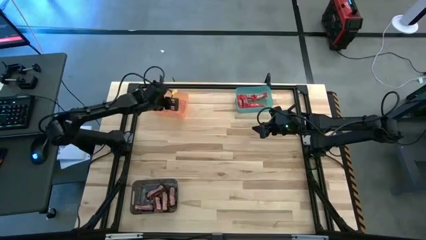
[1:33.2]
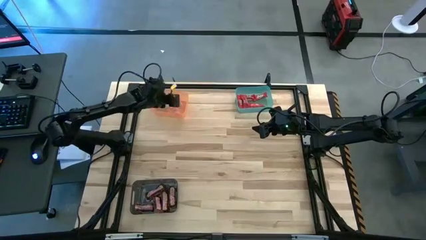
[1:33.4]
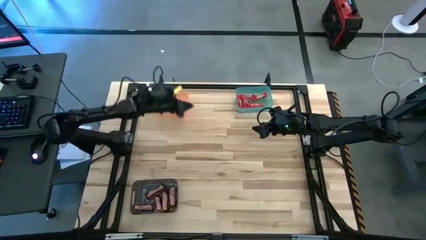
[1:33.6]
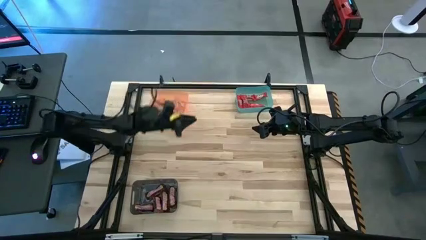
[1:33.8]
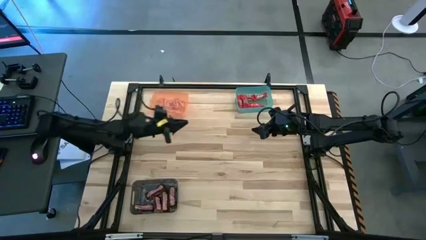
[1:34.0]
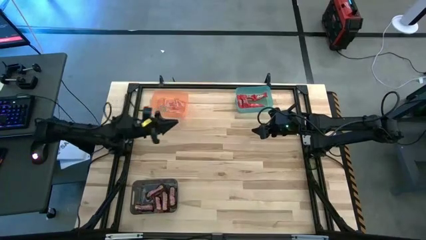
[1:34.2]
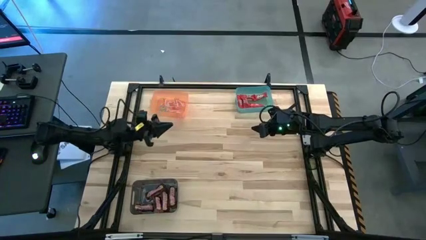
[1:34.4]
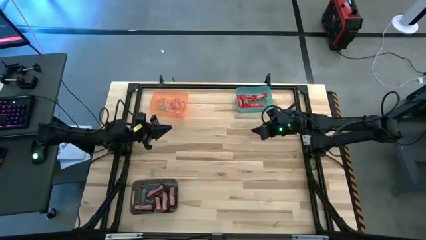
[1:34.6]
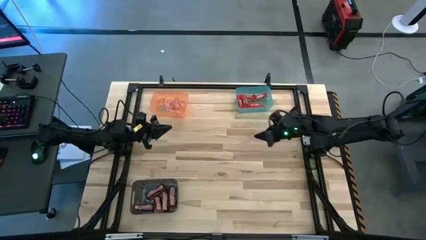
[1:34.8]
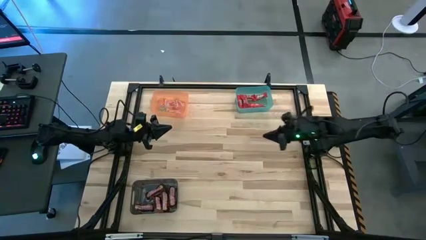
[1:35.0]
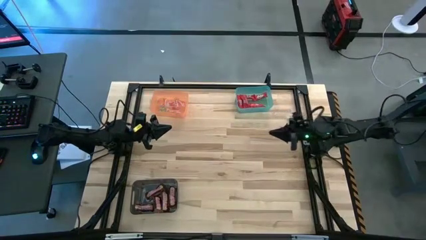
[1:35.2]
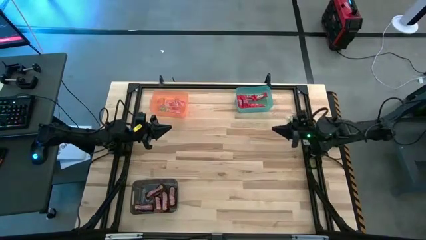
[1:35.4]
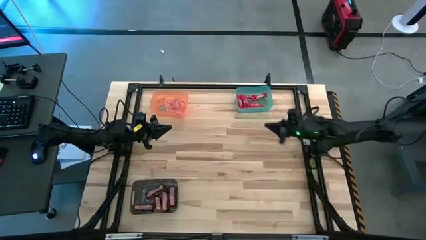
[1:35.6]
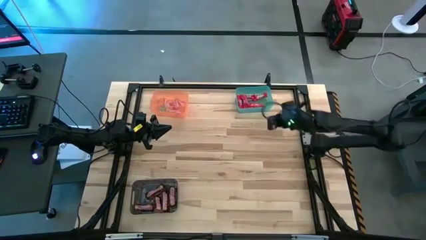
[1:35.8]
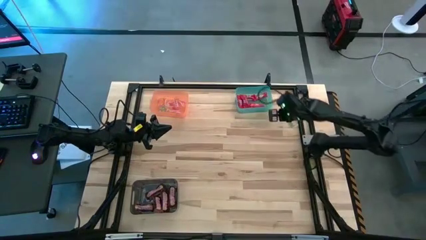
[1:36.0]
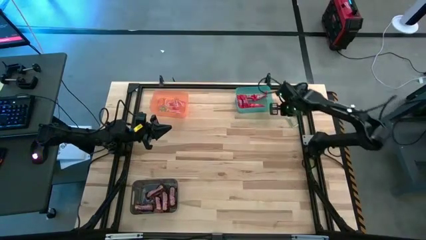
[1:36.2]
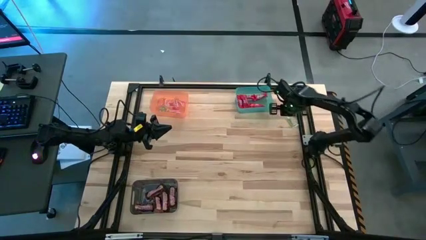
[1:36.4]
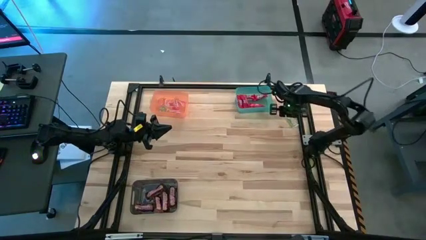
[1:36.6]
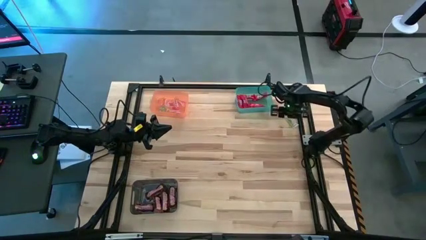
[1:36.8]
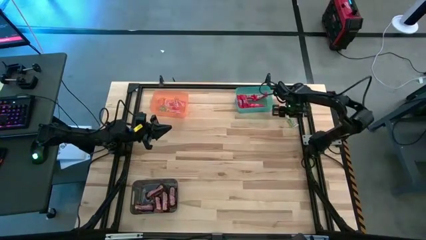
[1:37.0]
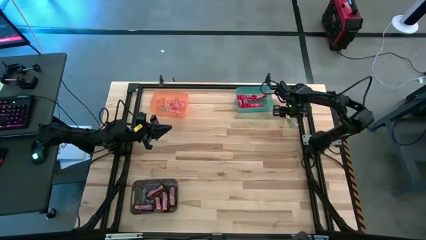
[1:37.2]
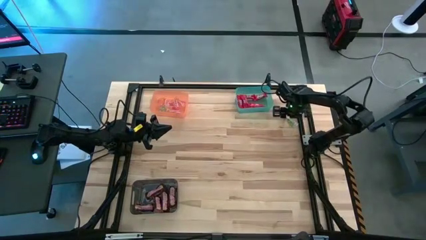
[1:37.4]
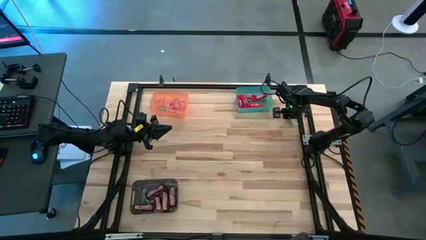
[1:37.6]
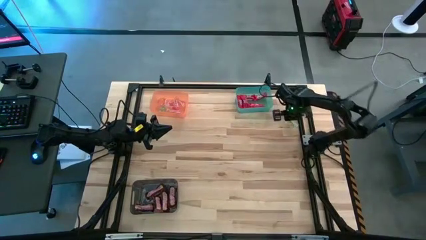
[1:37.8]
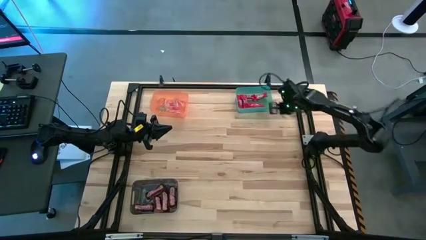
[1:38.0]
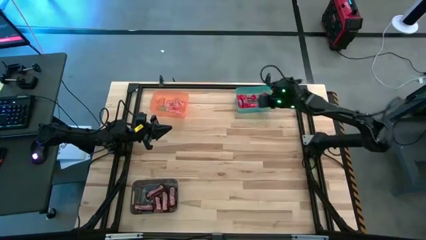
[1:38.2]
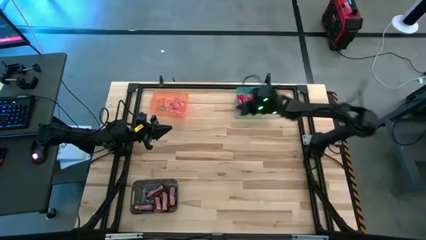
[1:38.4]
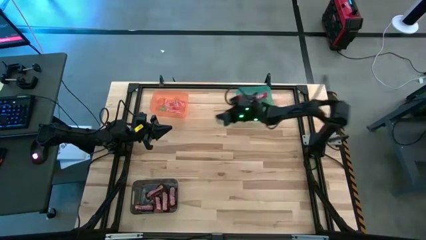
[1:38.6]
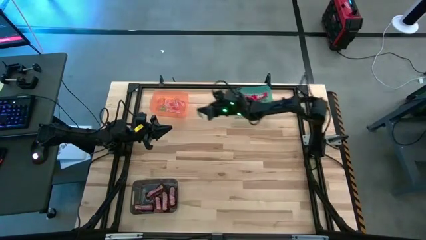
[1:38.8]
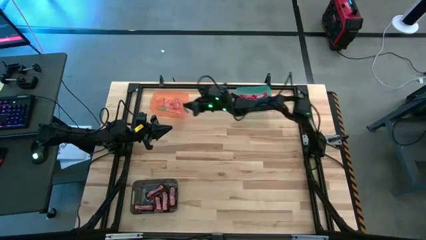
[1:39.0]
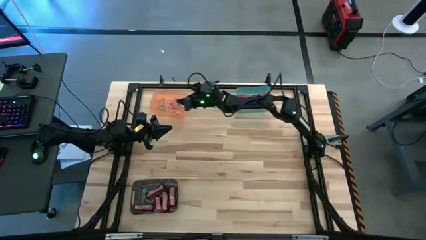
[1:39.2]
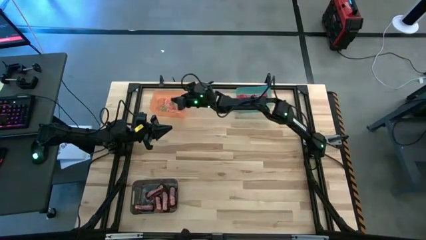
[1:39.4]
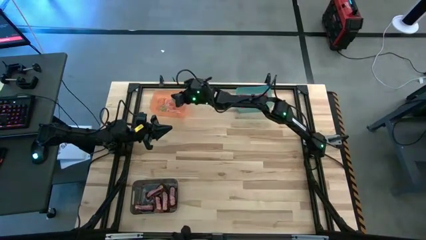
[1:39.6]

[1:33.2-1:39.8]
Task: Sort candy by brand, put in halloween buckets
Put the green gummy into the orange bin

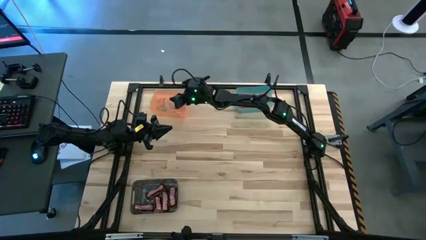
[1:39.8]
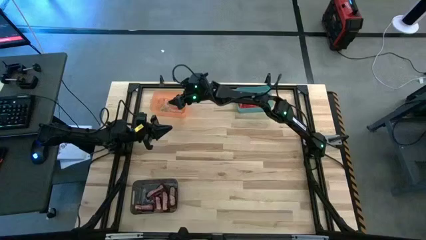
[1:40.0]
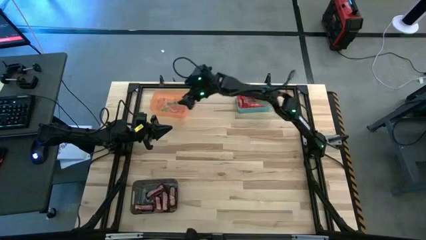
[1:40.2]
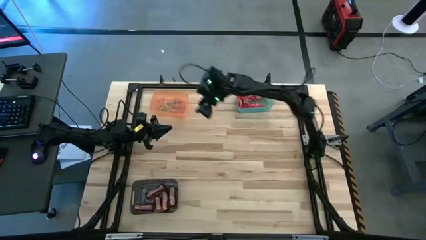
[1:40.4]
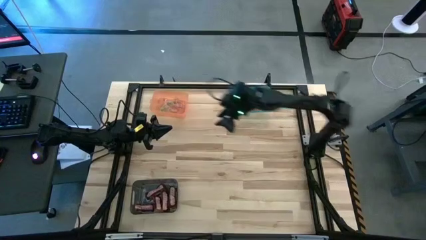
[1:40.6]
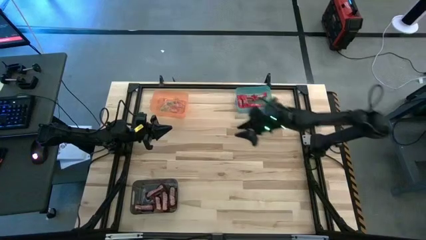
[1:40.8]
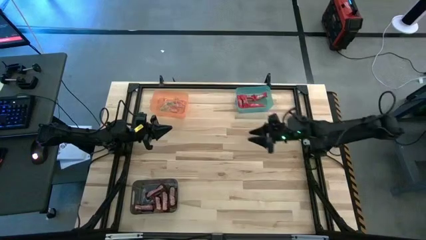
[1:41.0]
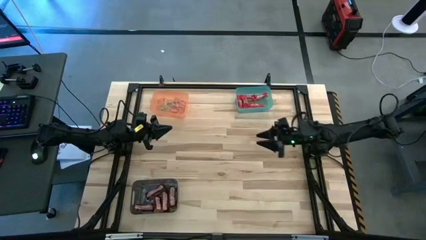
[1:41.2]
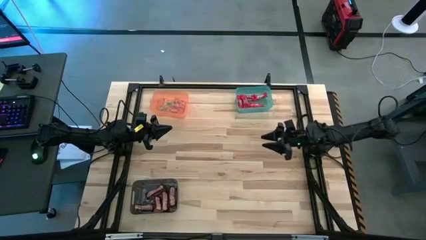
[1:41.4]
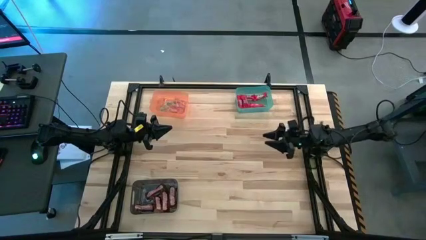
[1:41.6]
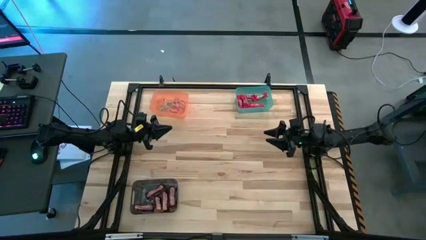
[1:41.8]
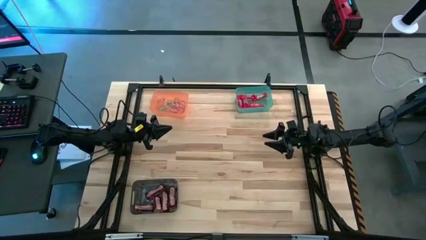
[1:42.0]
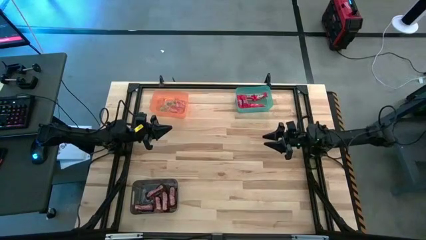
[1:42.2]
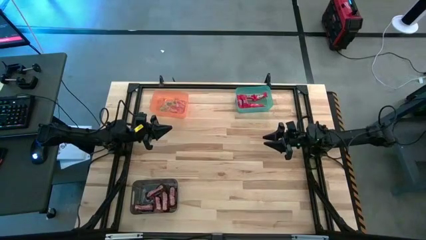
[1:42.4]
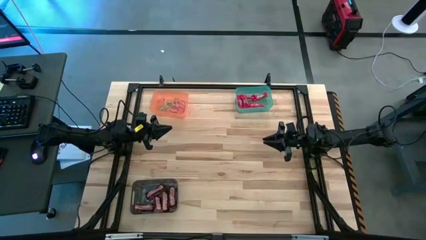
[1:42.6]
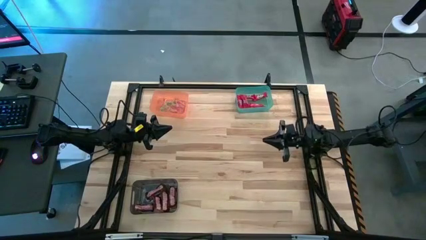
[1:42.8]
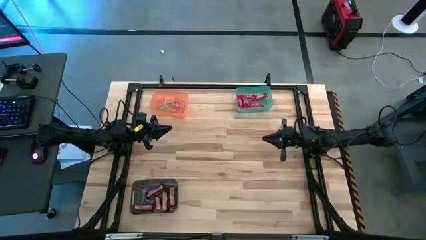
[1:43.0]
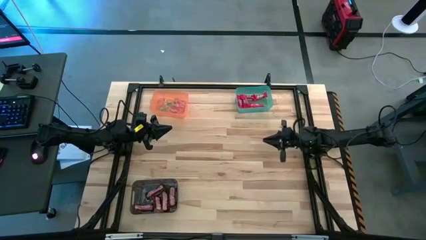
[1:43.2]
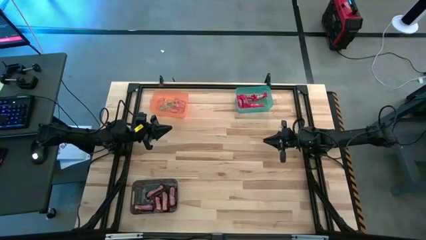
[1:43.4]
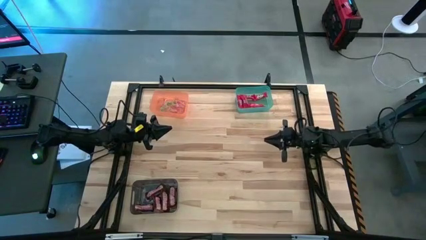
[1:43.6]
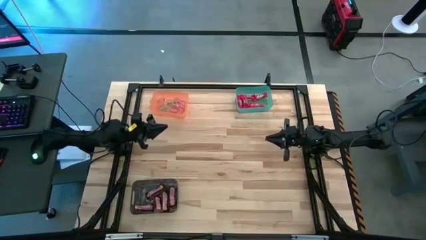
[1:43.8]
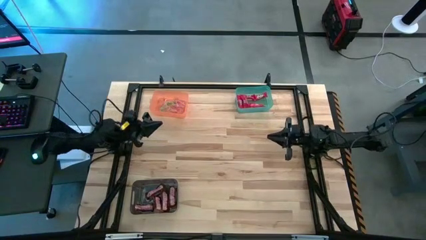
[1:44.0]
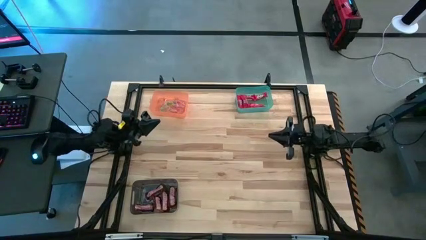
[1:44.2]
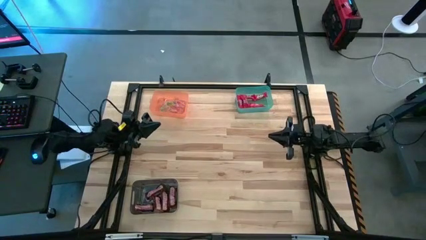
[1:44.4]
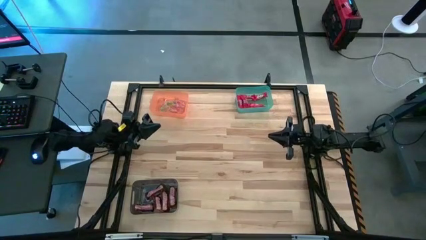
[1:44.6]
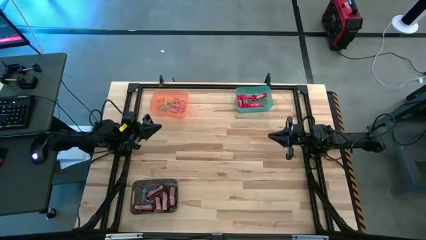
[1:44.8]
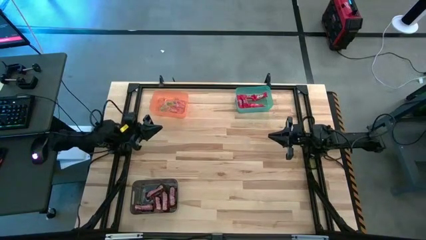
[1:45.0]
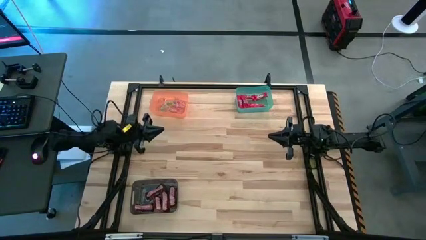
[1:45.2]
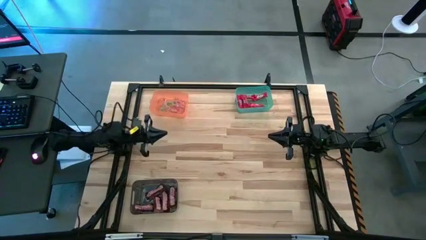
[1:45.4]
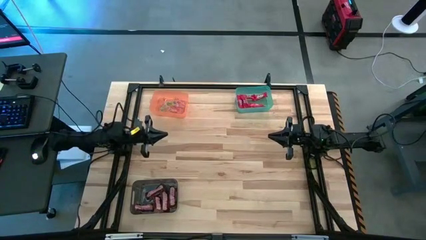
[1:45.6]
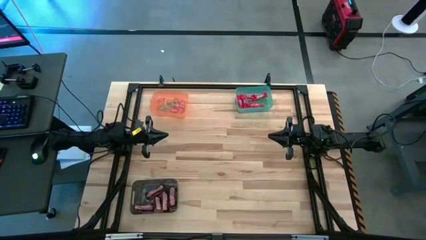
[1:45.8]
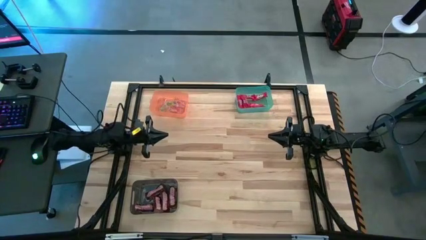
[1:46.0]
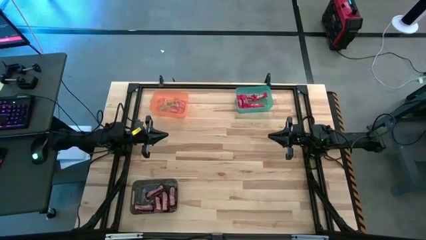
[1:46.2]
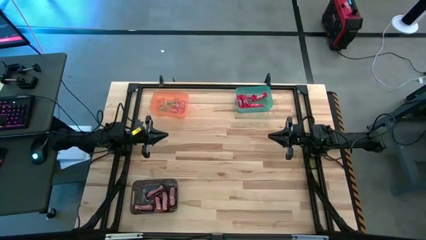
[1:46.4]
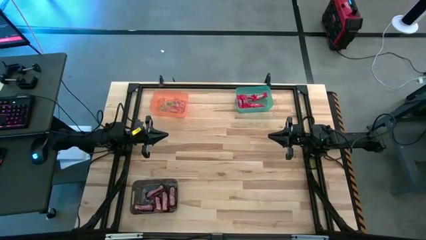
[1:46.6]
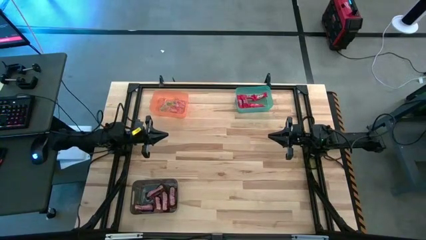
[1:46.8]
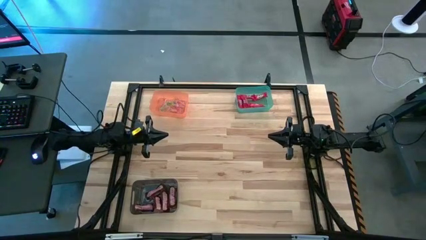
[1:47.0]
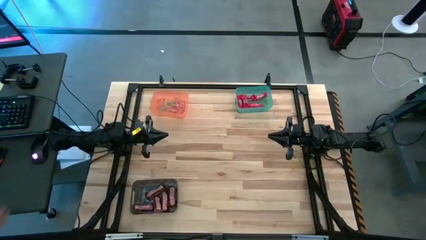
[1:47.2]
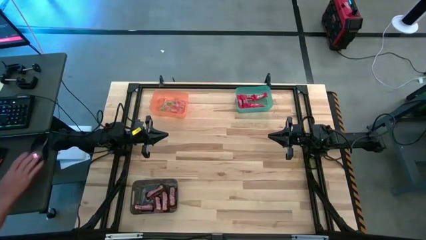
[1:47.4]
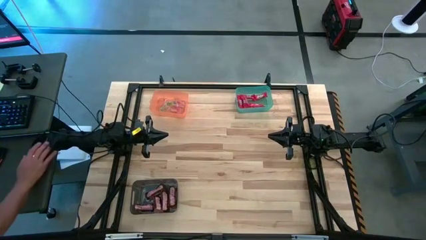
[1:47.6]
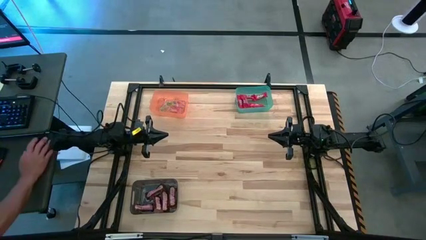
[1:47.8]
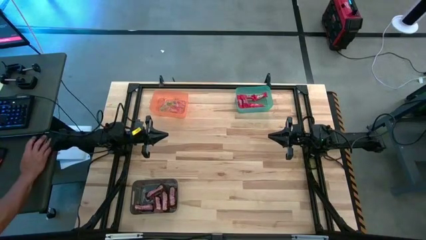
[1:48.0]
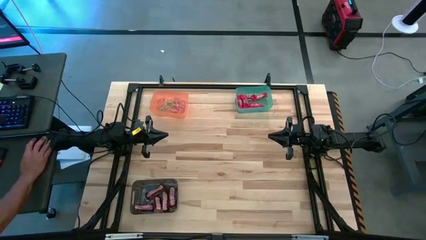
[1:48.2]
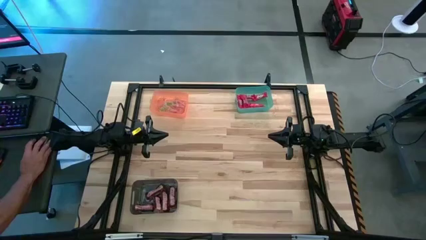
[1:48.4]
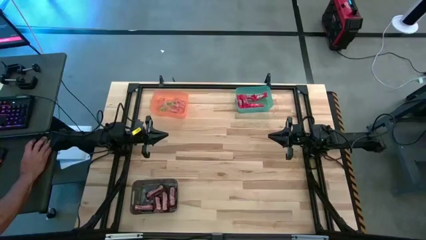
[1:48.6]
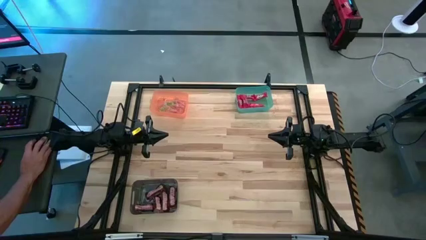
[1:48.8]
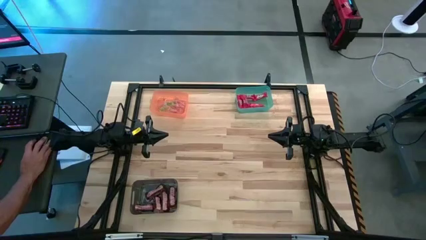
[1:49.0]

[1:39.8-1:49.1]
Return to Home Position
